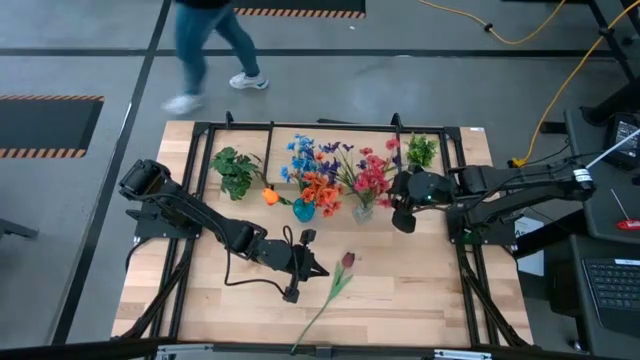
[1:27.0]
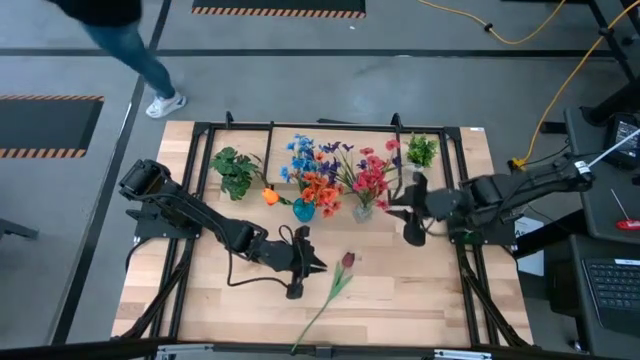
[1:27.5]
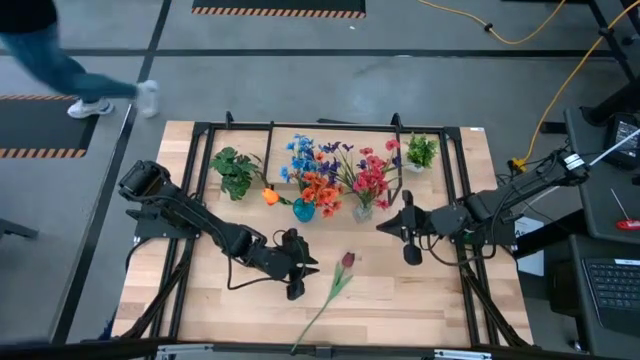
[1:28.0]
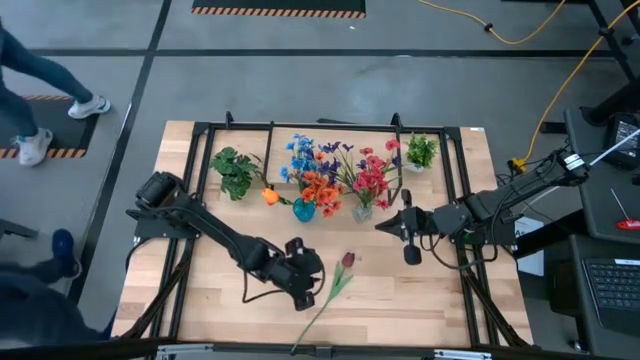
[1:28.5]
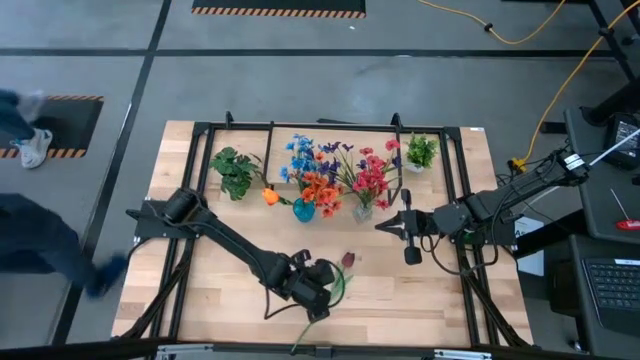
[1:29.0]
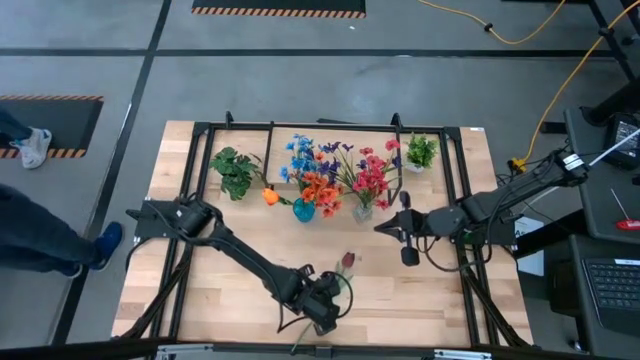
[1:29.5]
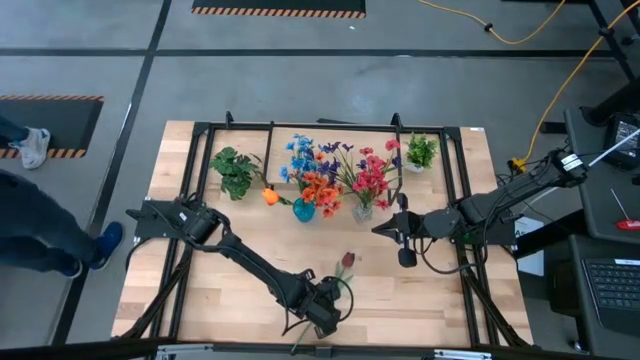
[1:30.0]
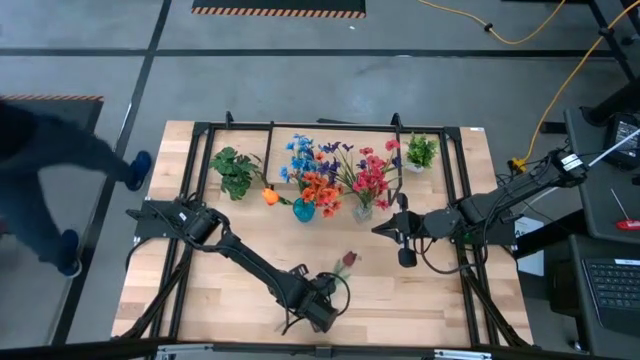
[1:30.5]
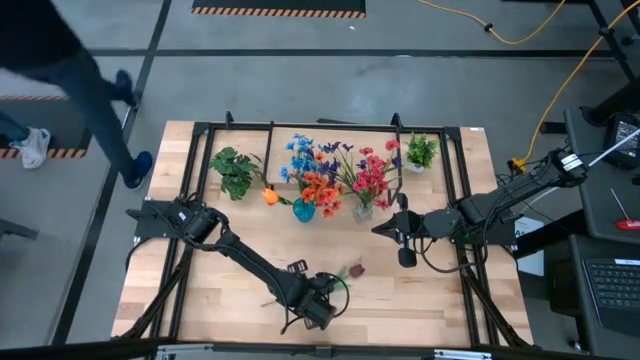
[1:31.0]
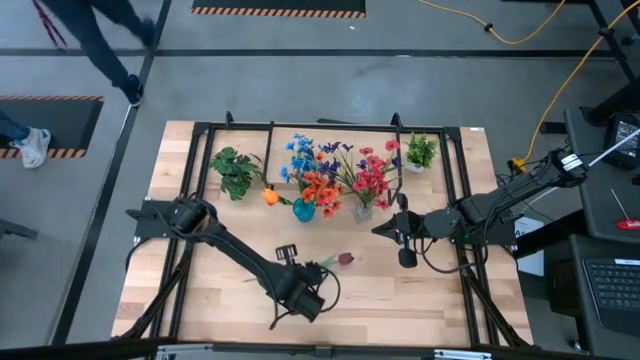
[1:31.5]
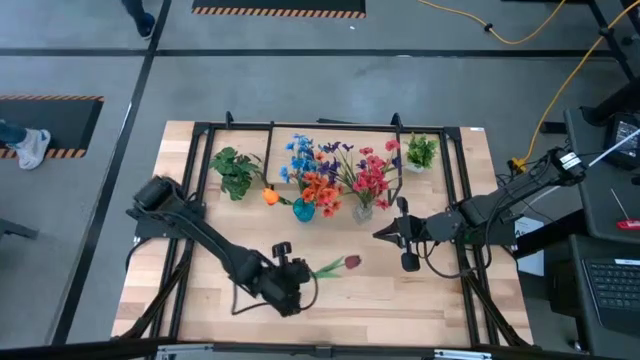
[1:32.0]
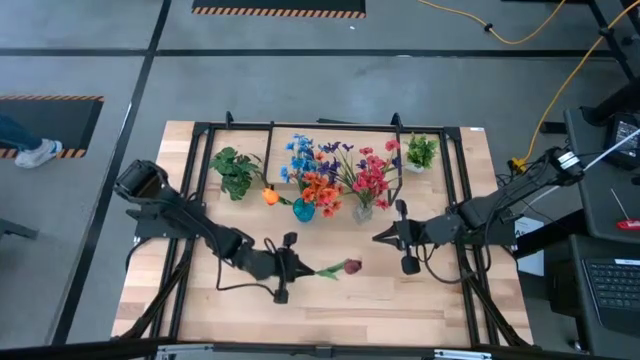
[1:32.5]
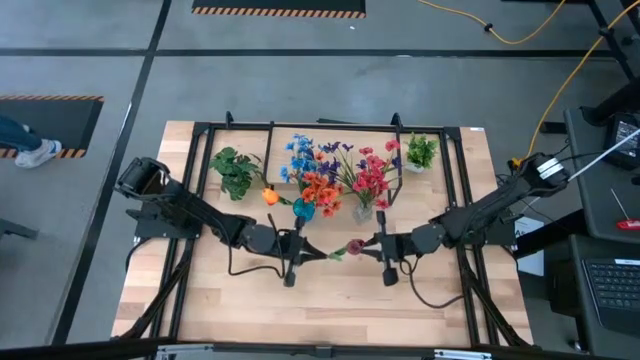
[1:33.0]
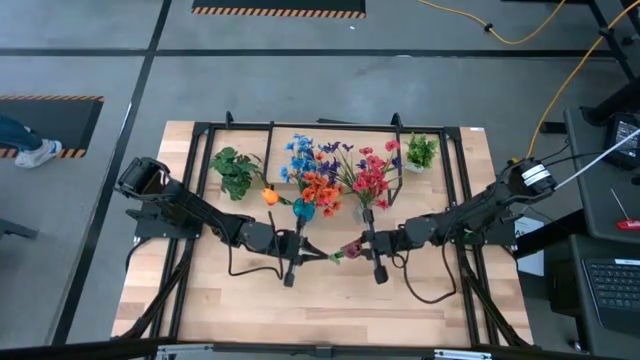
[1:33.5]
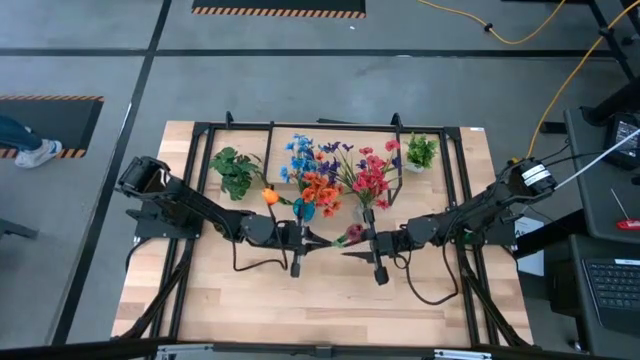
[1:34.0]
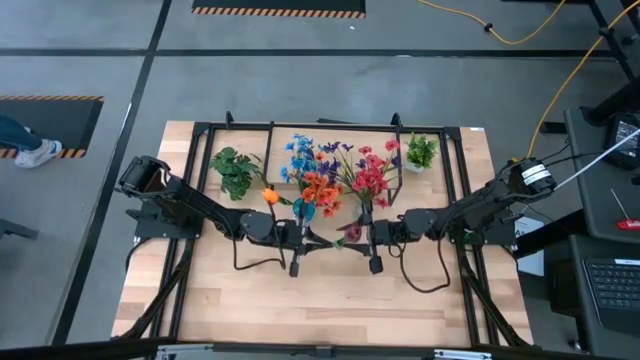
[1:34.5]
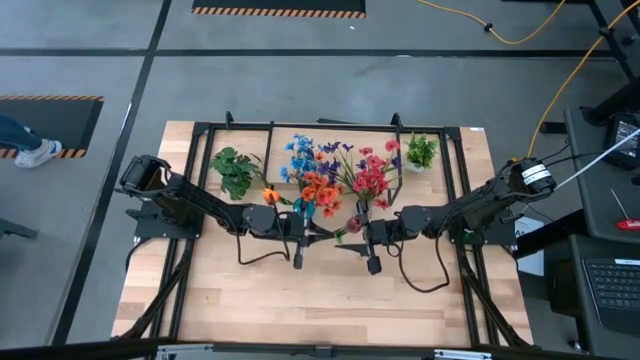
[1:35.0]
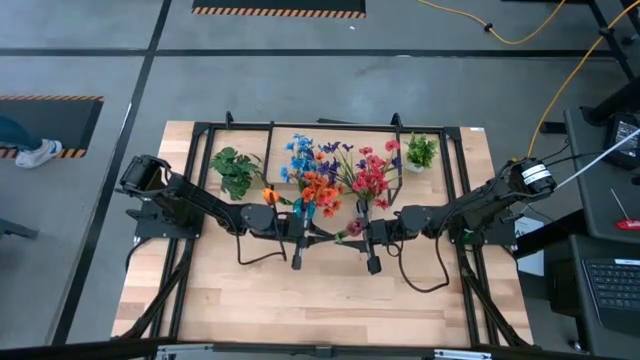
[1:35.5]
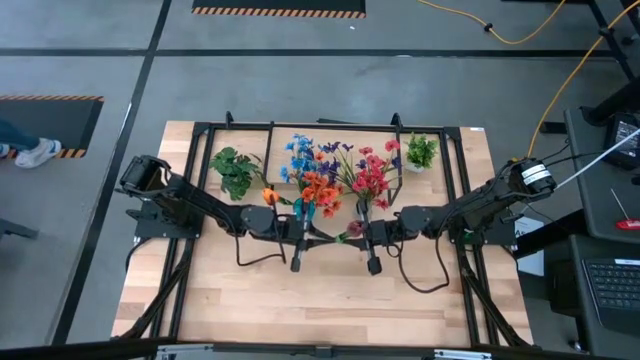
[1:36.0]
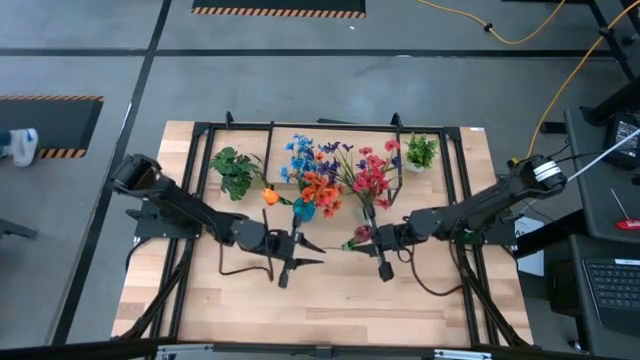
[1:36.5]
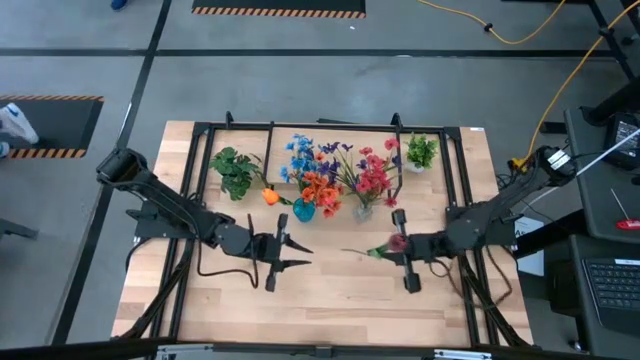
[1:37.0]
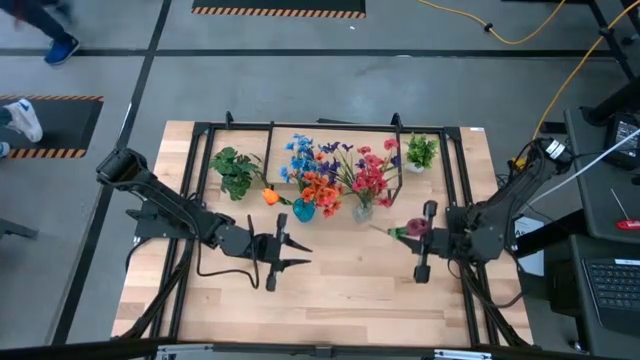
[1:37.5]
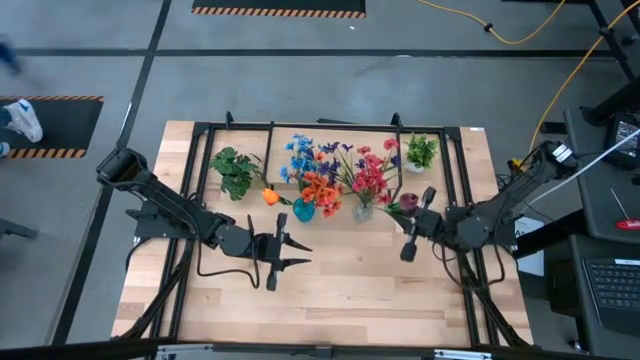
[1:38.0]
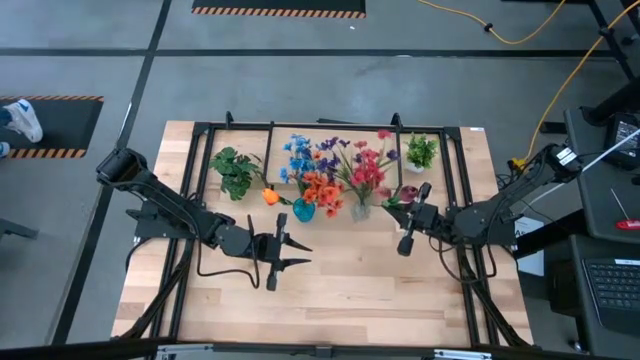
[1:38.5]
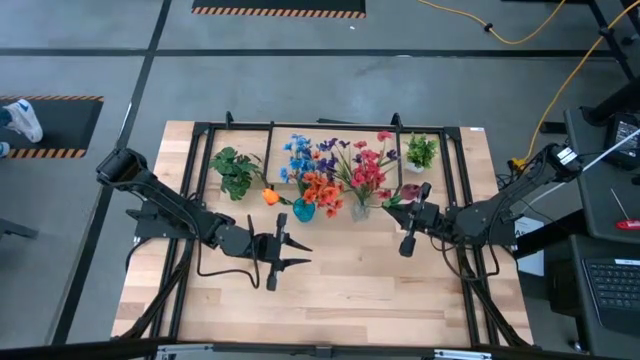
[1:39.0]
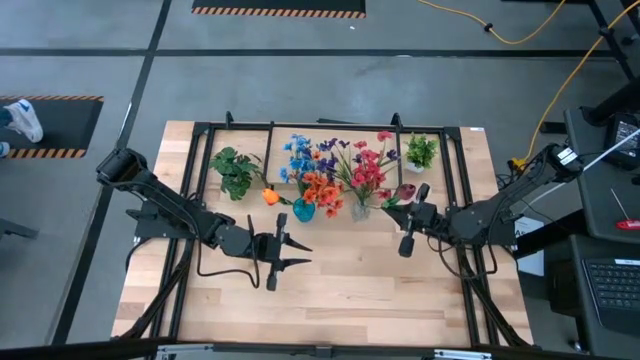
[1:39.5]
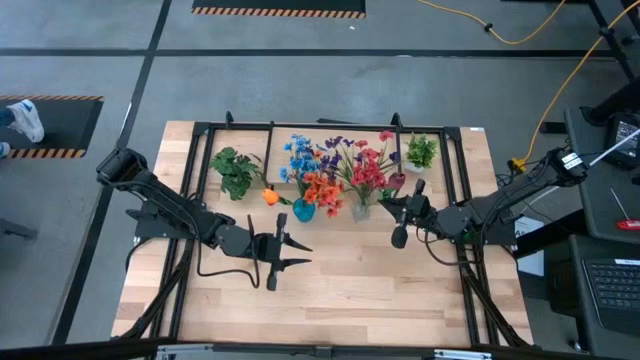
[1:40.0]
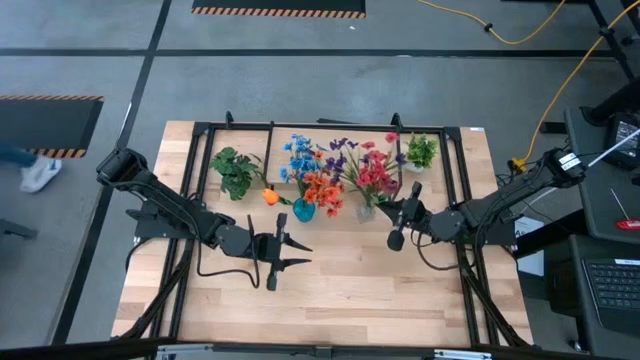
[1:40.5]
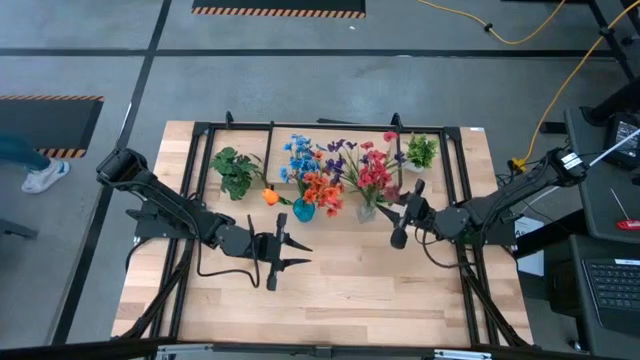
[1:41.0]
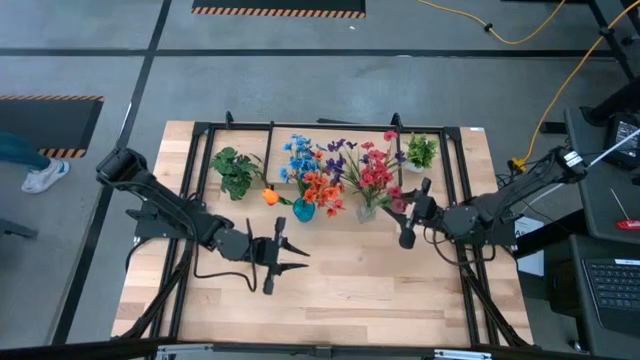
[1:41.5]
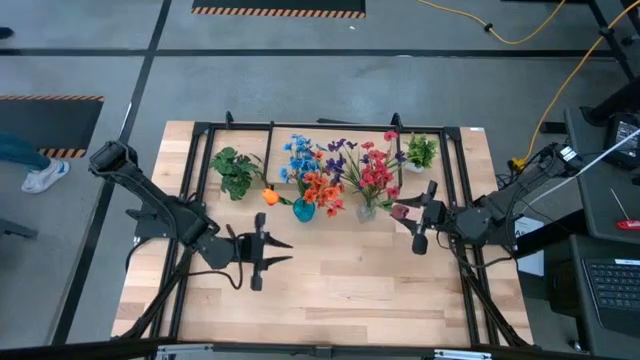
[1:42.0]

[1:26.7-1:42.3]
Task: Pick and place flowers into a vace then onto a shelf
Put the red flower into the transparent vase

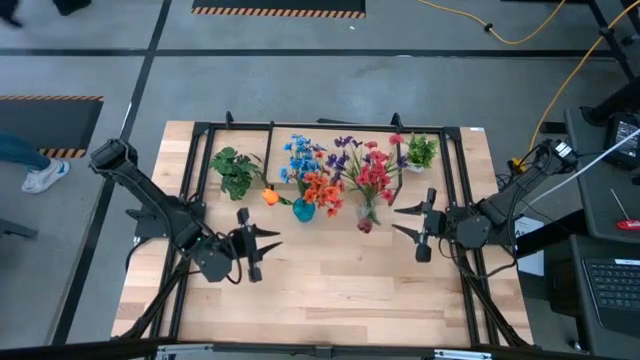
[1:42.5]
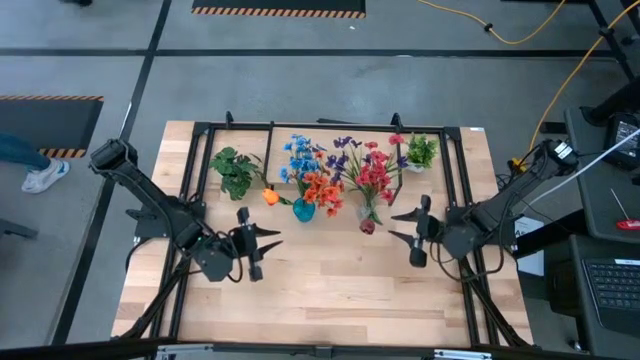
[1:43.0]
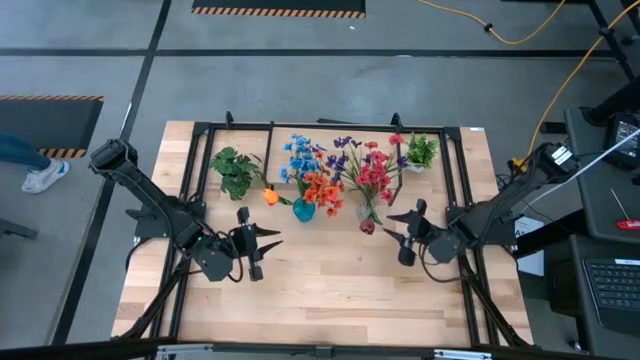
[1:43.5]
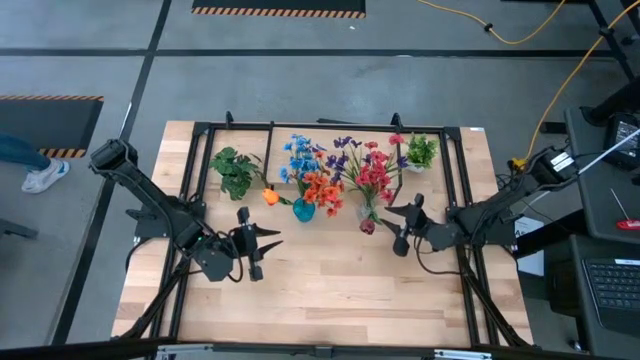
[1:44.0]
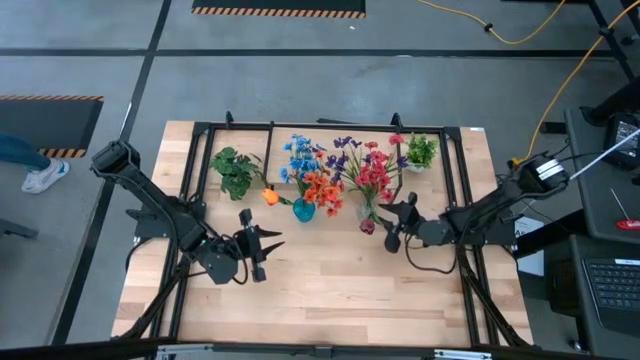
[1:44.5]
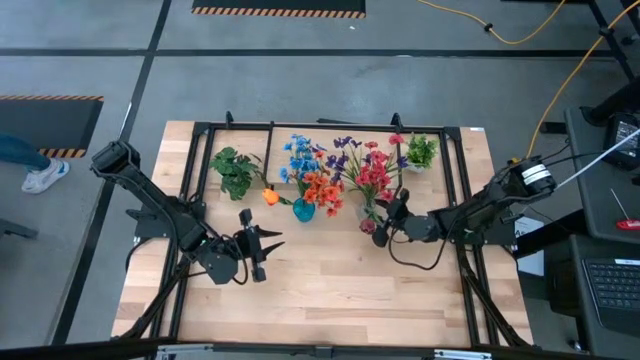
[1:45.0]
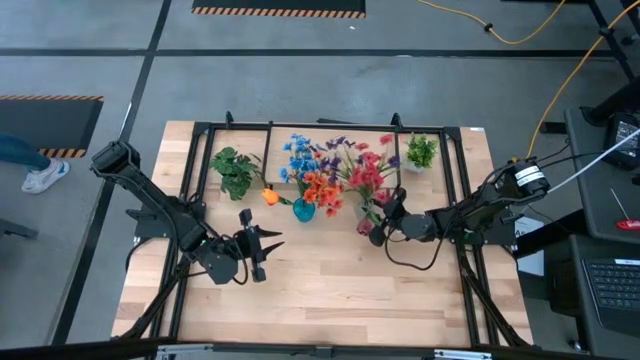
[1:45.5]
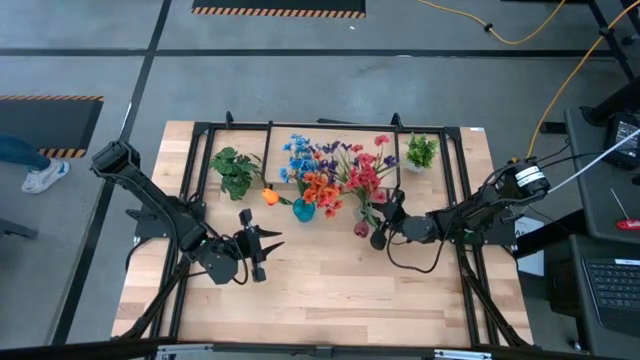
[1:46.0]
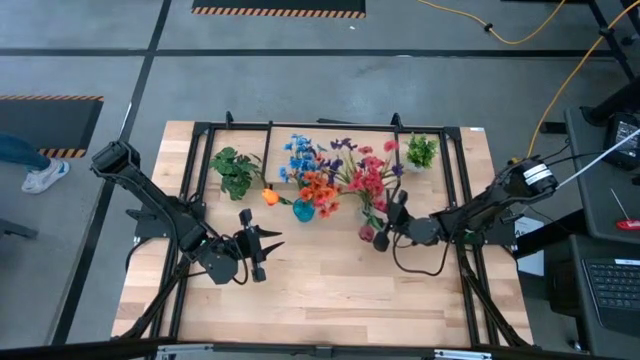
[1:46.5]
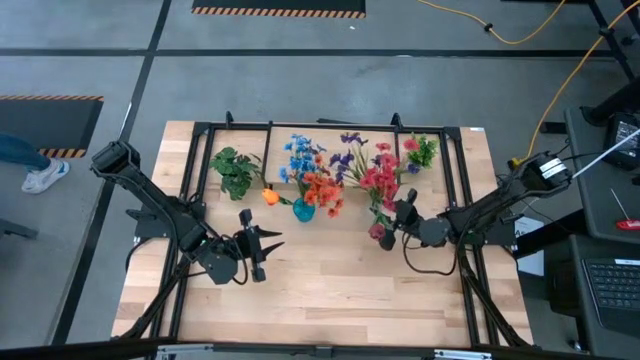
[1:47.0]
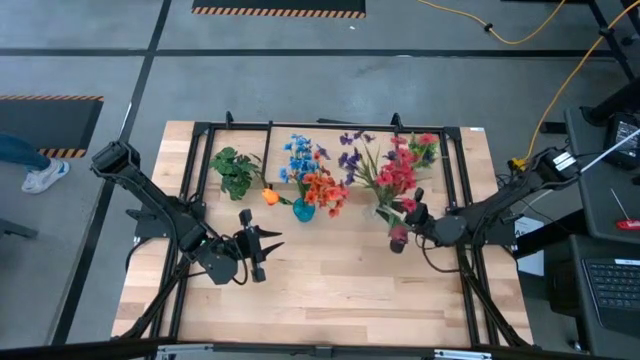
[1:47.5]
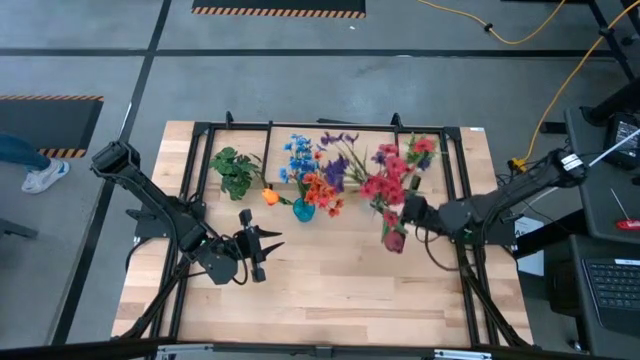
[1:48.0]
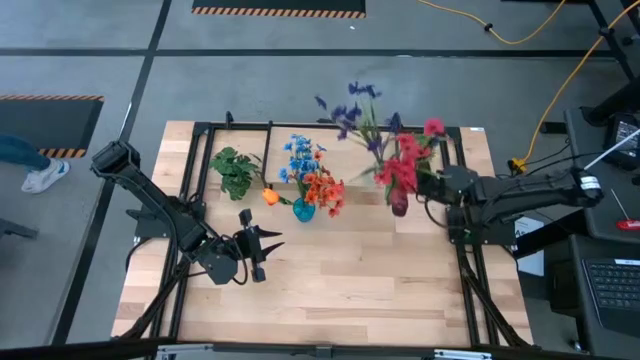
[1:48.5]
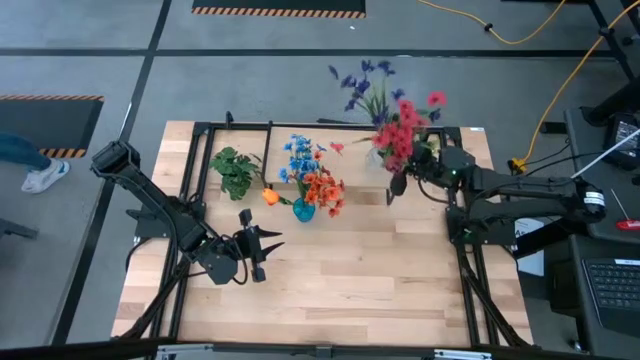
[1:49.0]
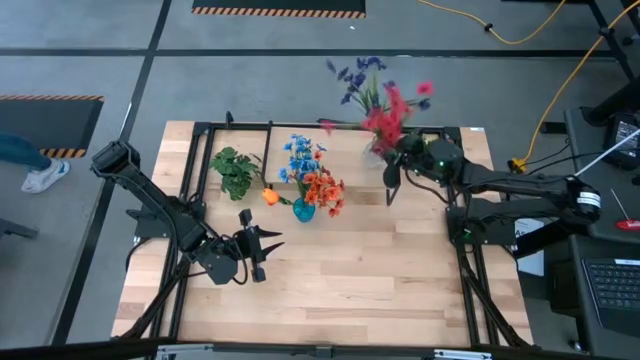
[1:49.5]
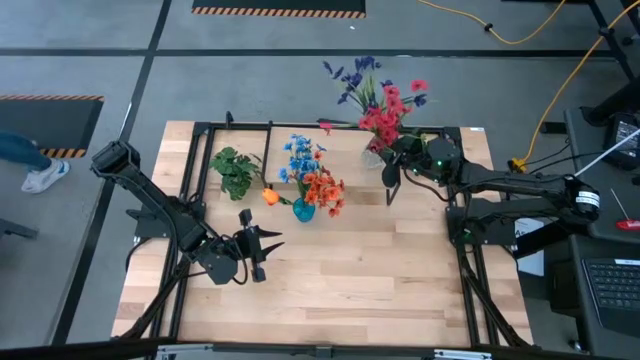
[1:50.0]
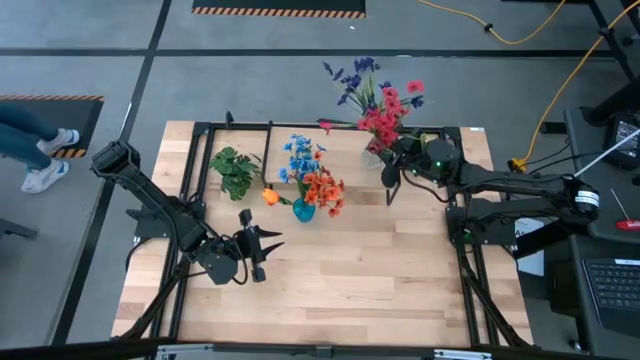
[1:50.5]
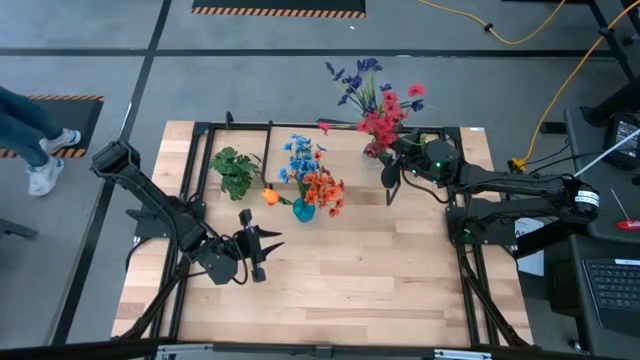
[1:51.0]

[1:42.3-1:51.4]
Put the transparent vase on the shelf
